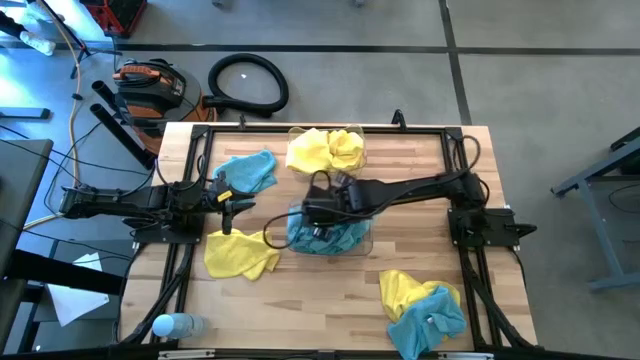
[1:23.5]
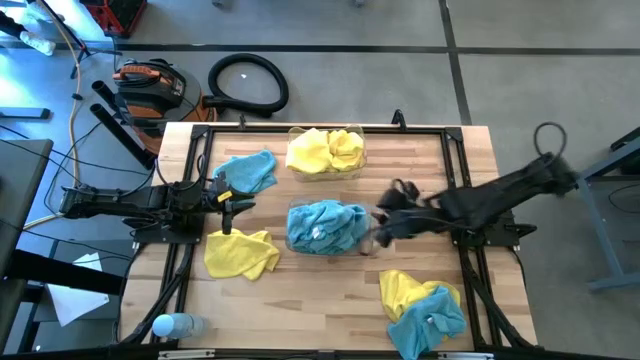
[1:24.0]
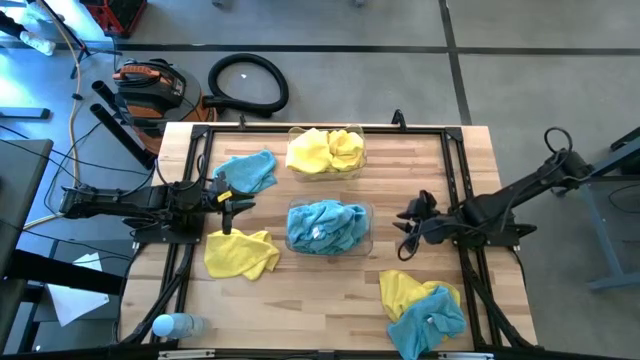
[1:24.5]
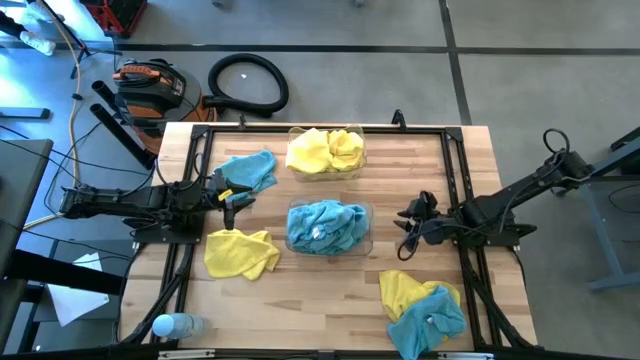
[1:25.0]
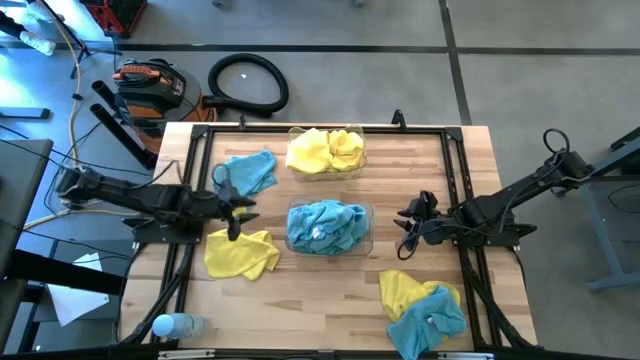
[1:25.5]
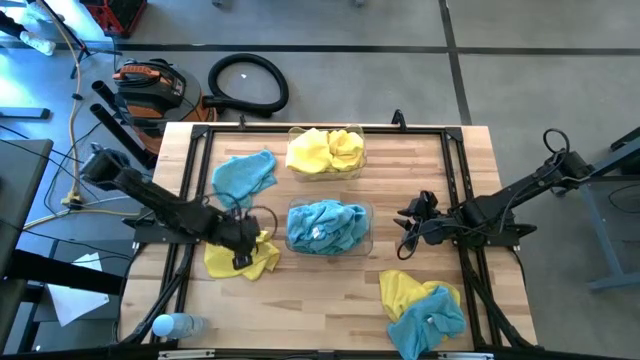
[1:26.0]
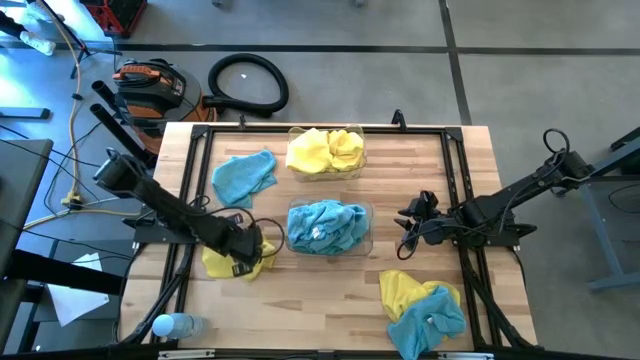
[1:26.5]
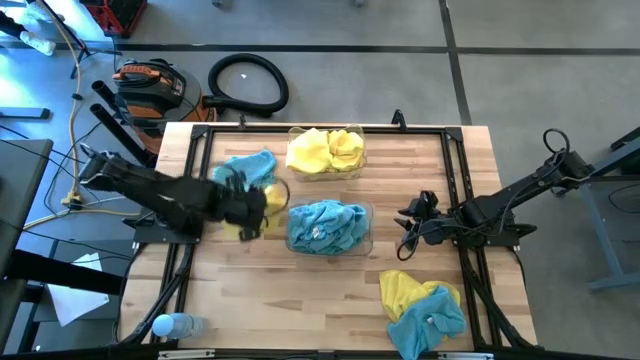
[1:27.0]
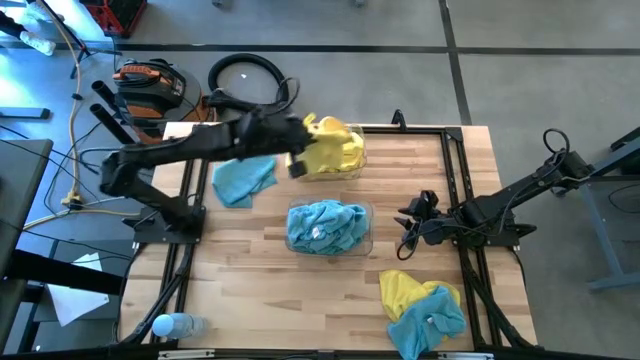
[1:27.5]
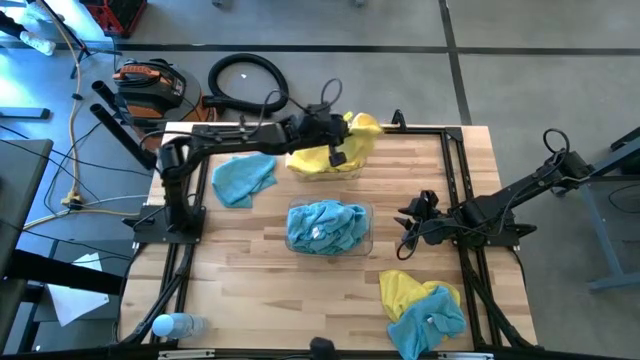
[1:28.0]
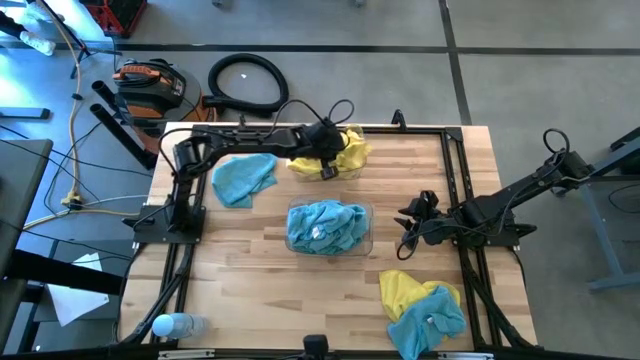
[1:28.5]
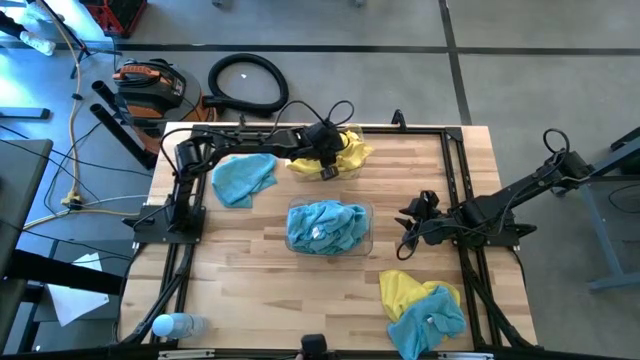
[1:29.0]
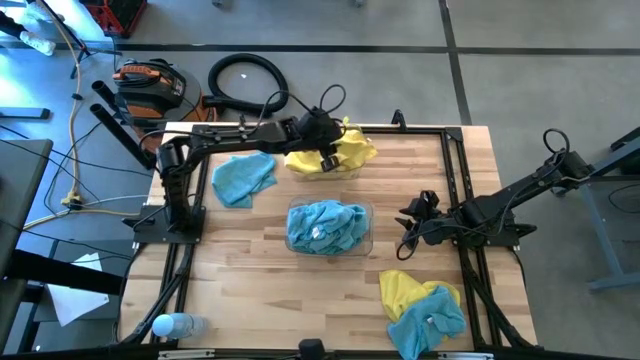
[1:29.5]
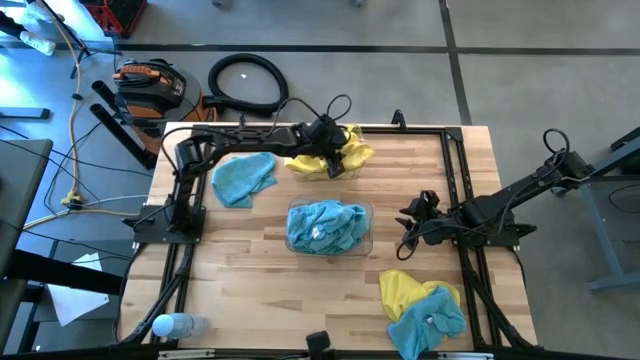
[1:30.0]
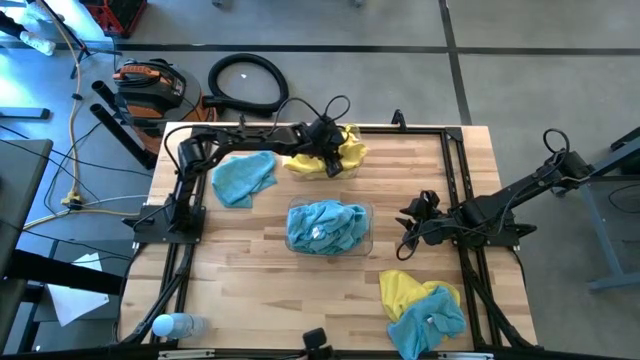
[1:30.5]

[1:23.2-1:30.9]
Task: Sort microfiber towel by color & place in baskets
Put the yellow microfiber towel into the top transparent bin

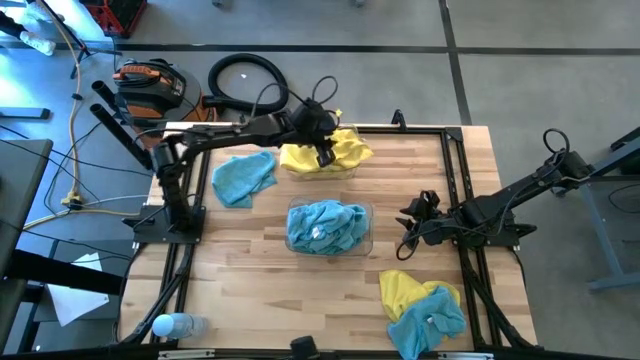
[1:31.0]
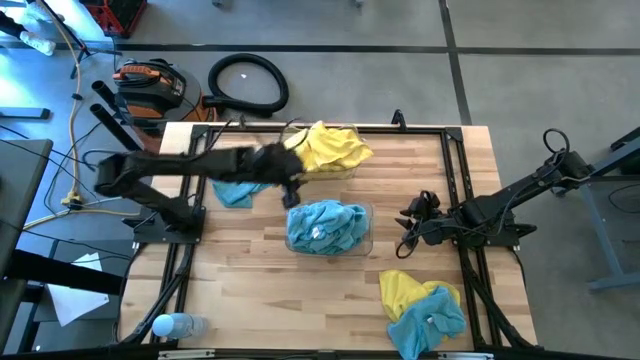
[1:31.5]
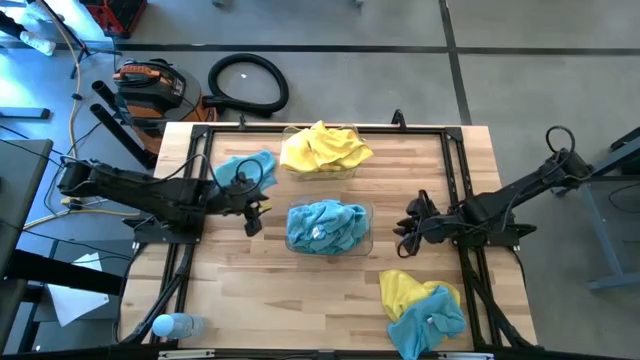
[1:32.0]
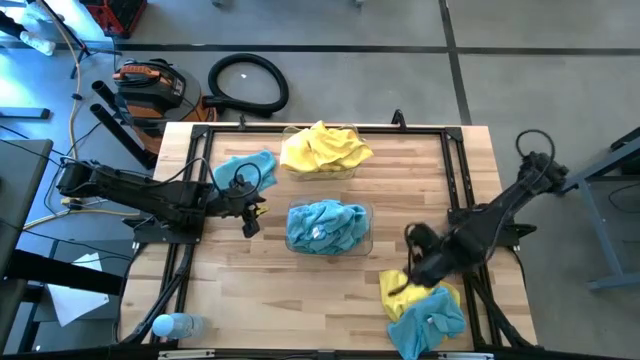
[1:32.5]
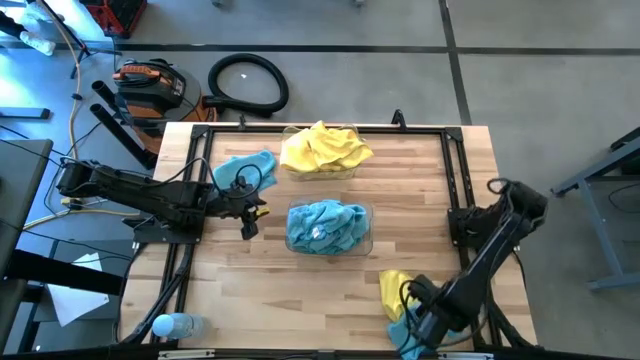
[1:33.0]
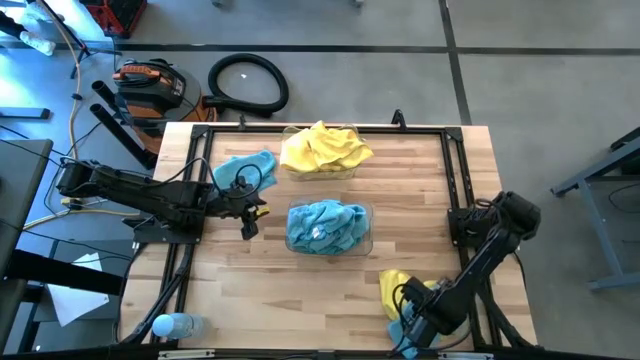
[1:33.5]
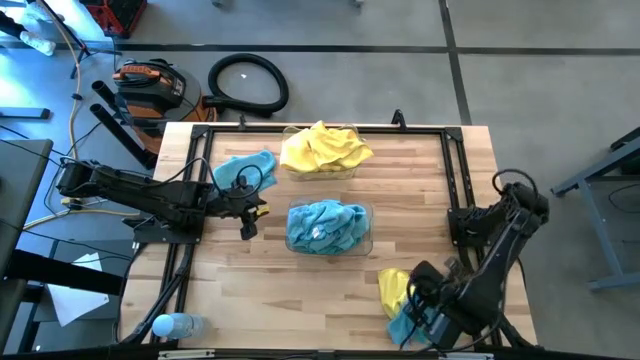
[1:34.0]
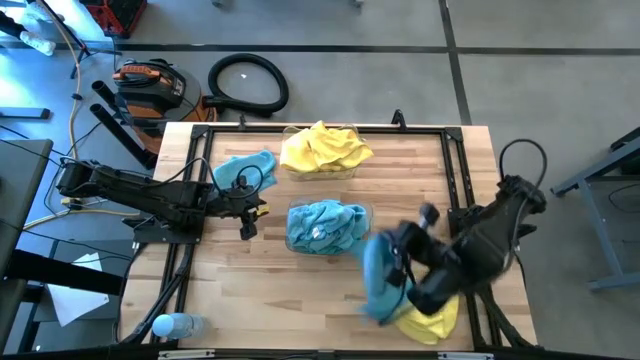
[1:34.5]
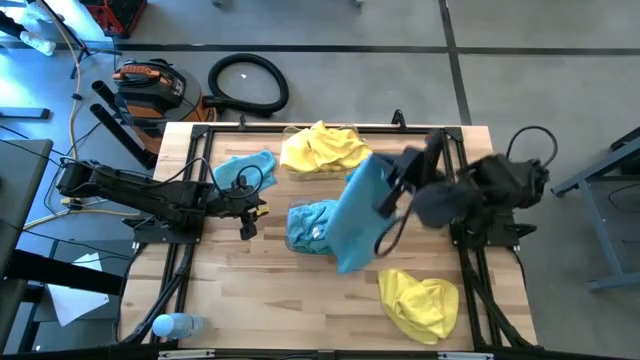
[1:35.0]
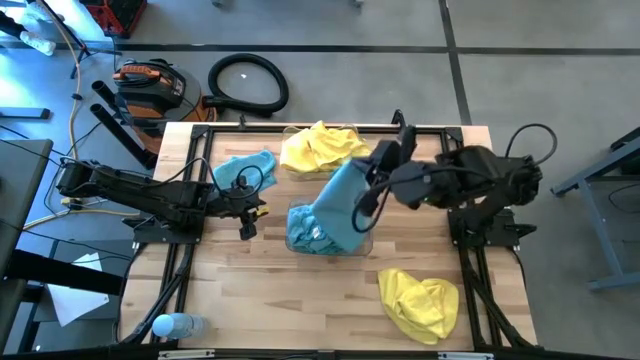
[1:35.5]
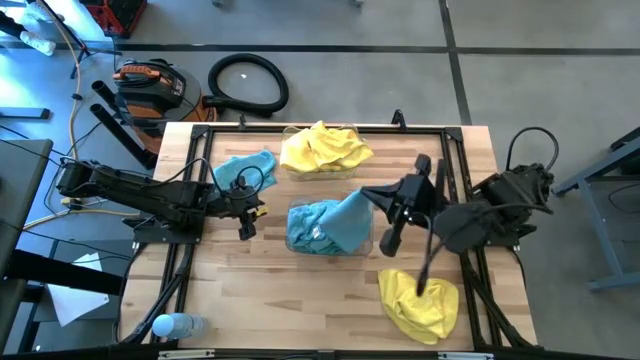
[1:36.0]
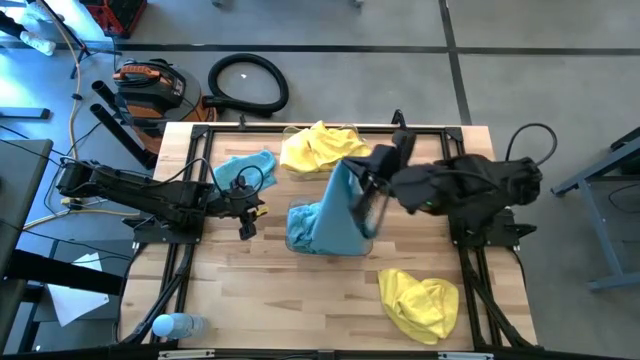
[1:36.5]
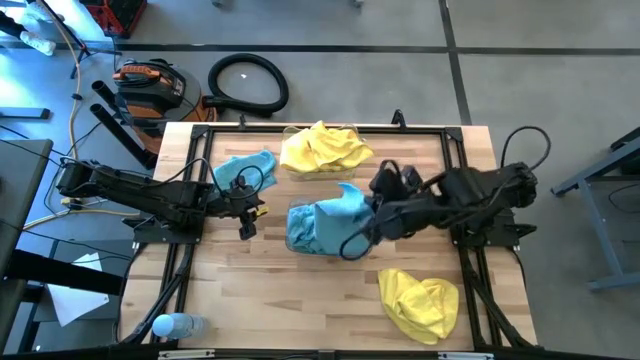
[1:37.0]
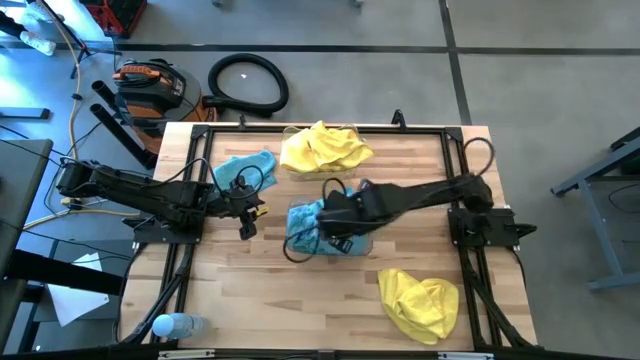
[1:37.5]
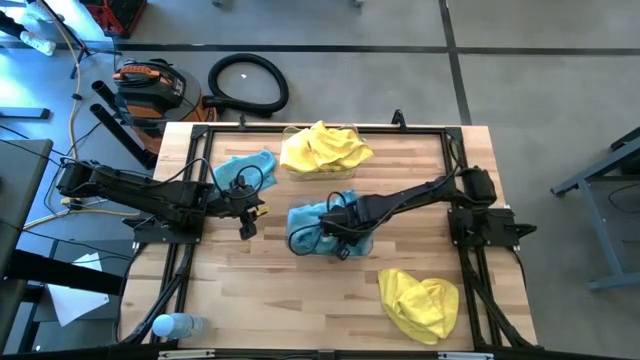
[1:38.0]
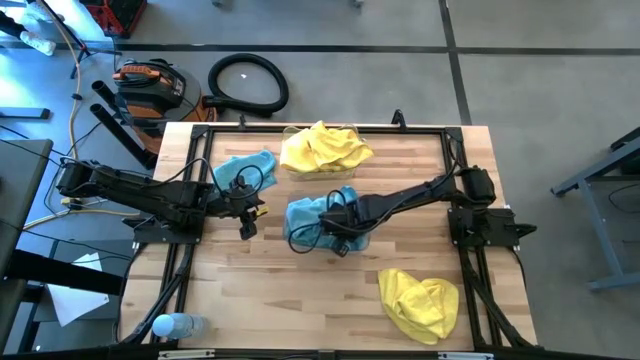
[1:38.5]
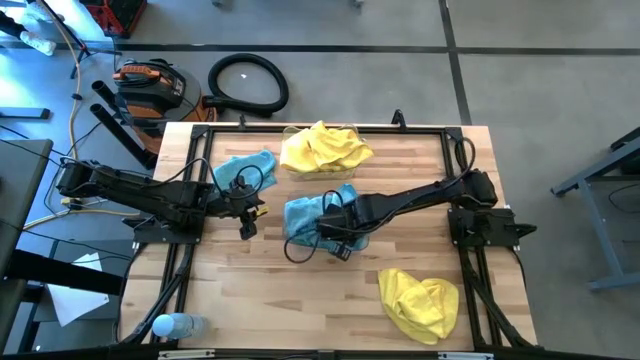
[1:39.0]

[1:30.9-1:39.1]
Put the blue microfiber towel into the bottom transparent bin

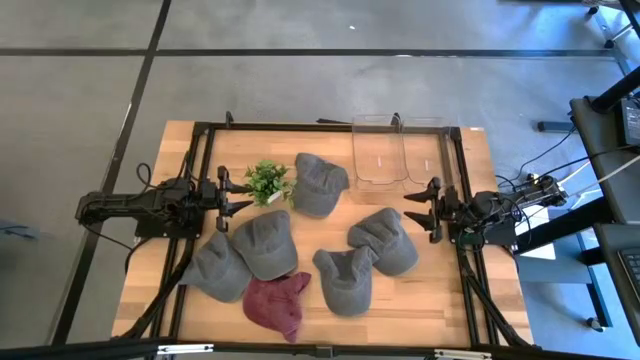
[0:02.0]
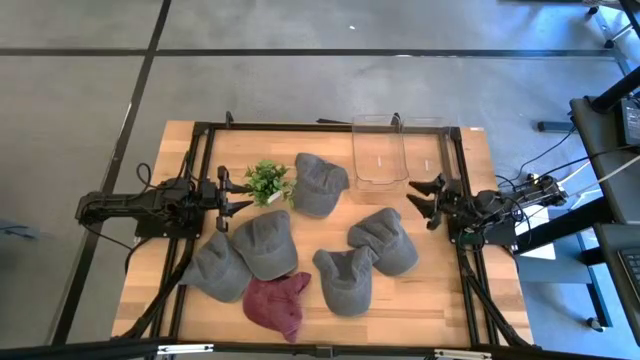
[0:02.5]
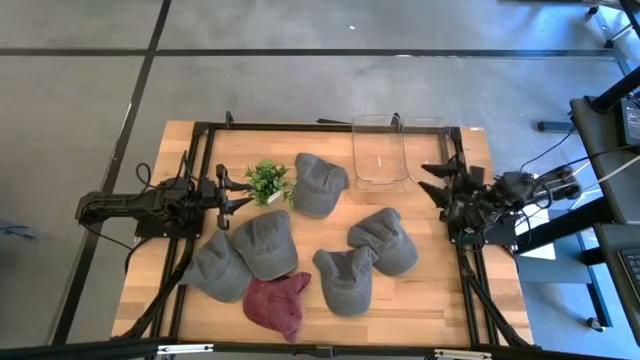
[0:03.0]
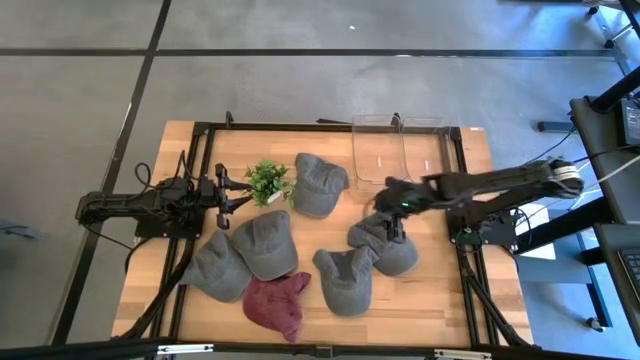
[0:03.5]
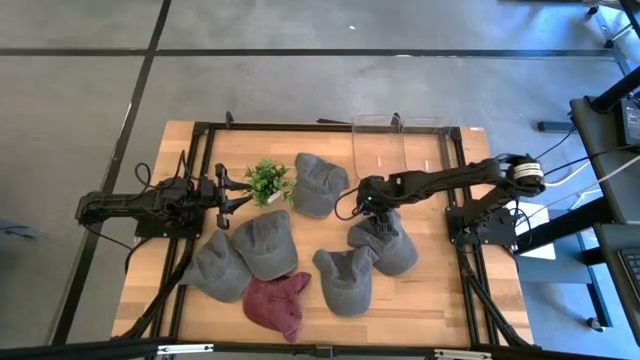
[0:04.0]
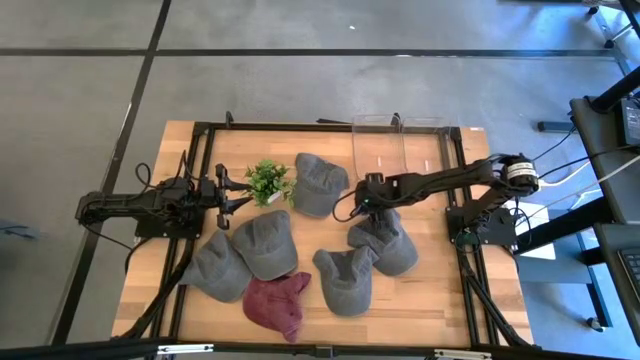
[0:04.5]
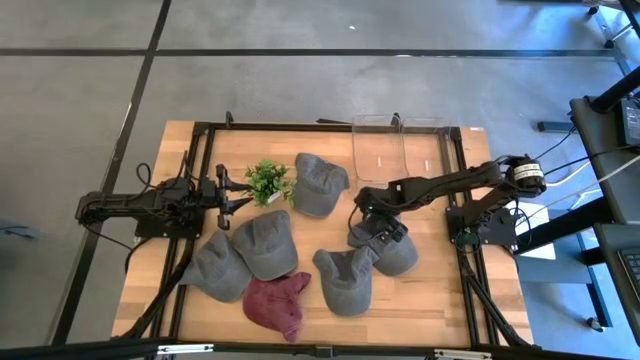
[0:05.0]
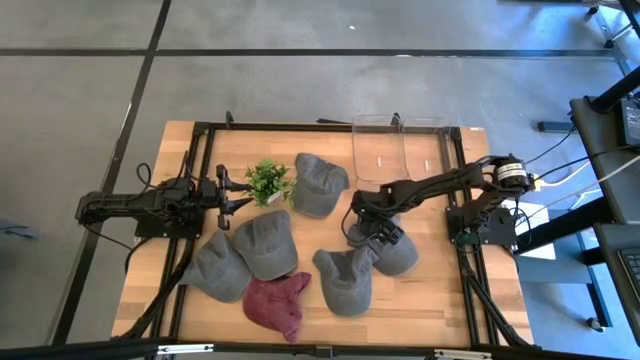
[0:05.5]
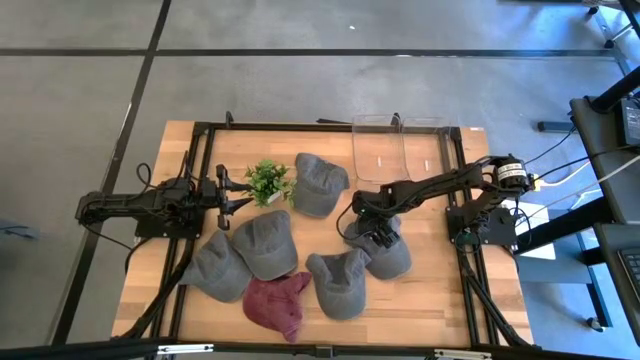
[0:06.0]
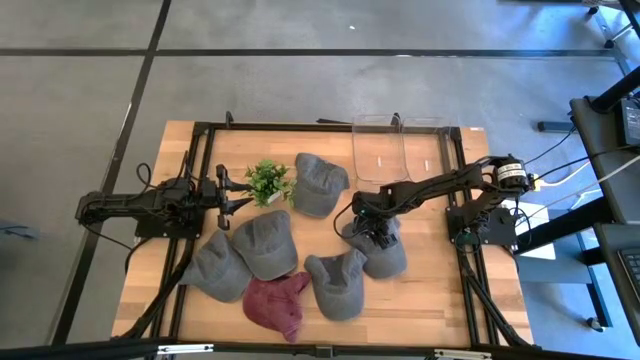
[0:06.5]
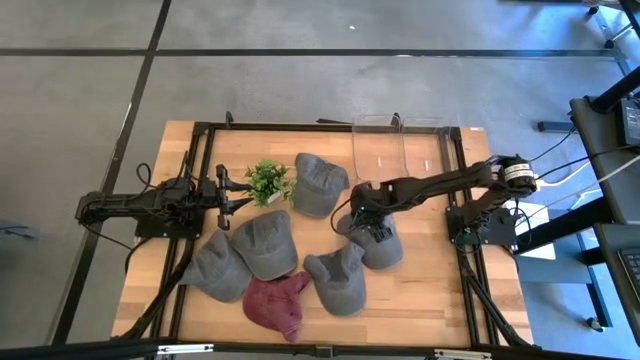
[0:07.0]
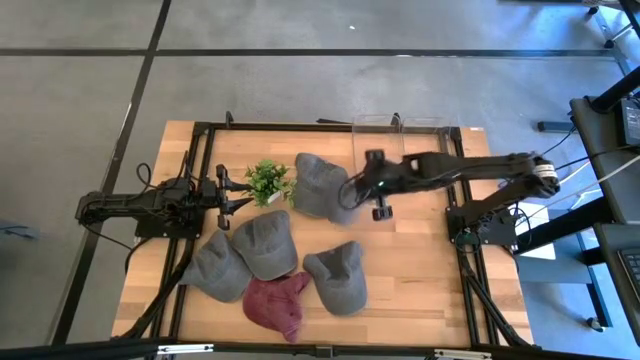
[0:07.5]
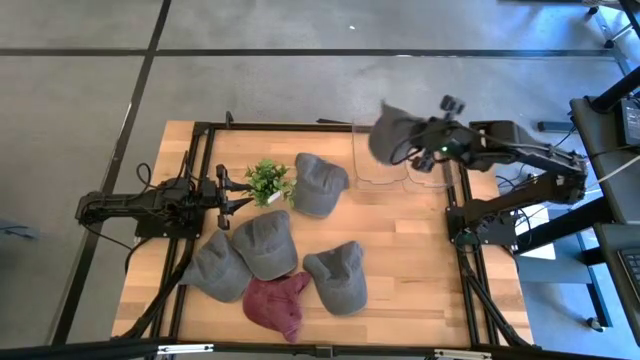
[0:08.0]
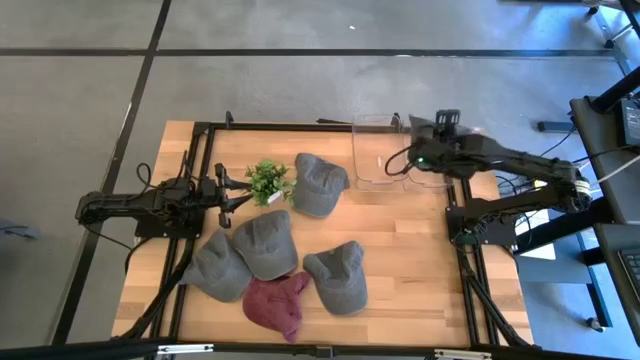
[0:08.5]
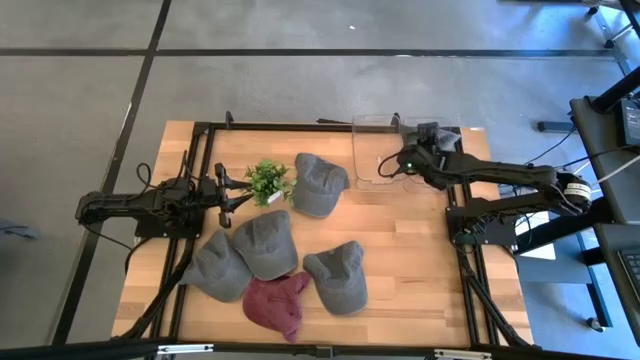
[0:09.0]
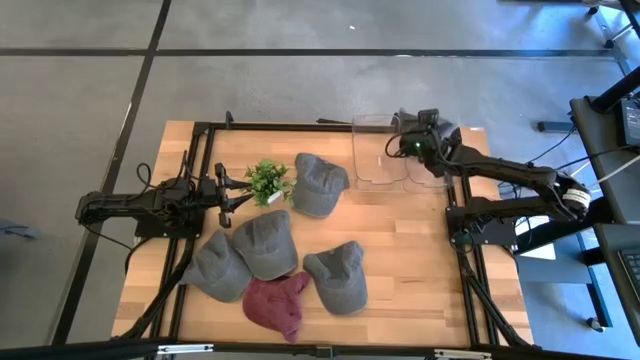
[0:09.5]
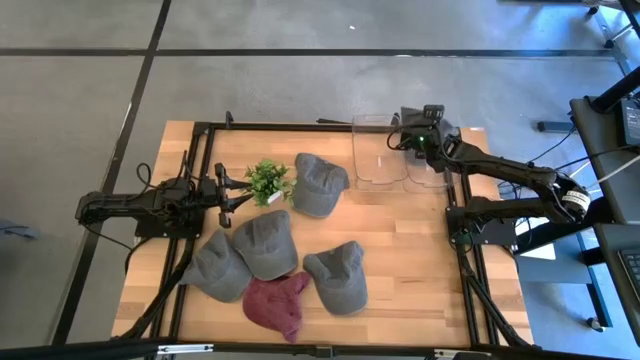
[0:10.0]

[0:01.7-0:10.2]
Task: Pick & Place hat
Put the gray cap into the right transparent bin
